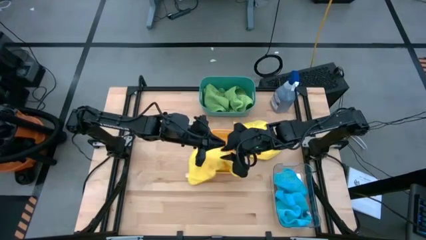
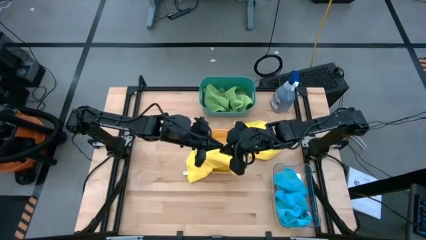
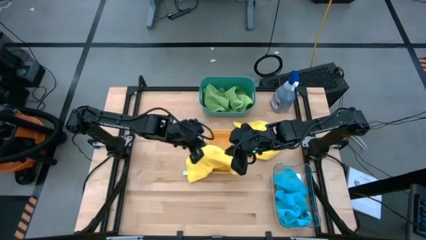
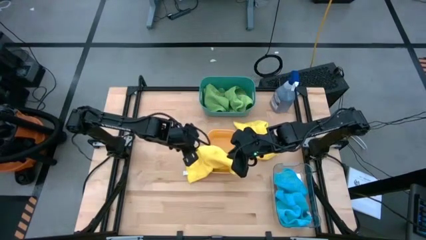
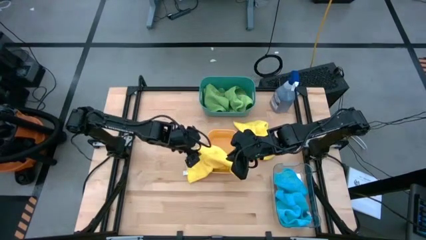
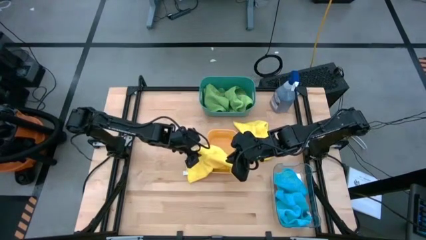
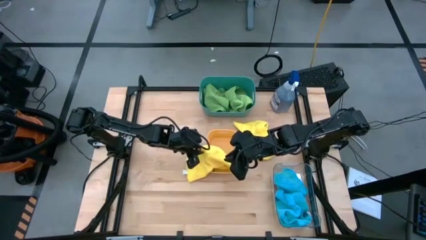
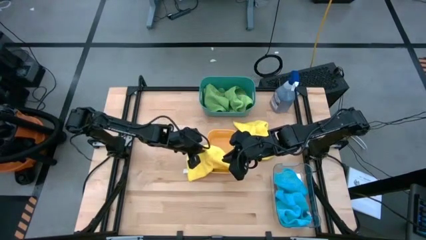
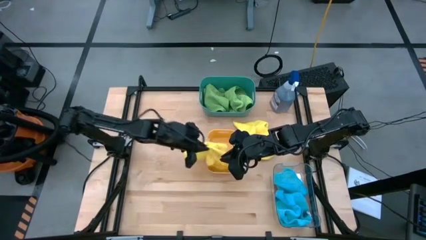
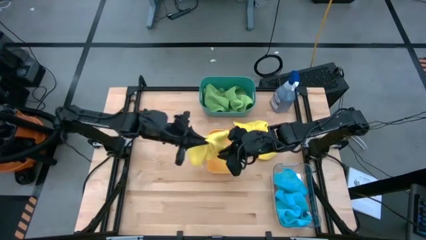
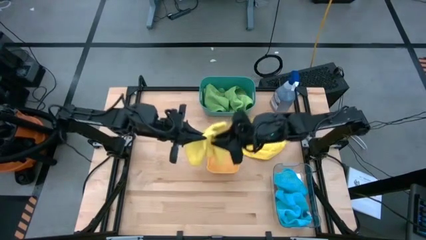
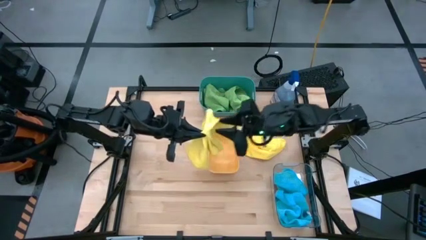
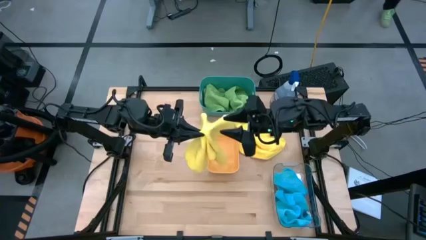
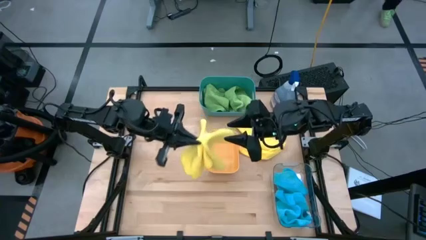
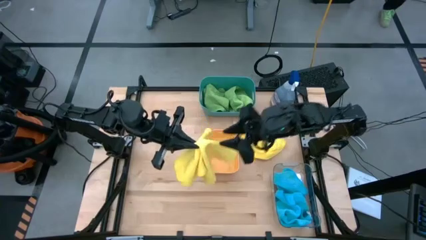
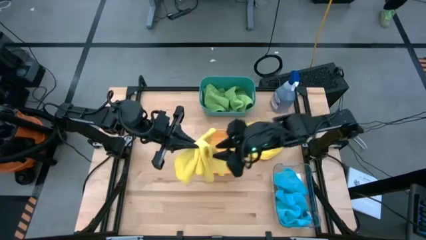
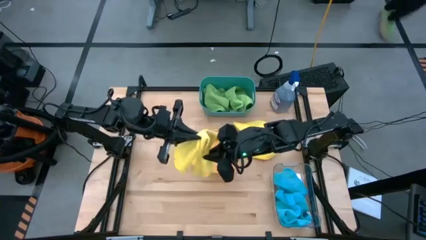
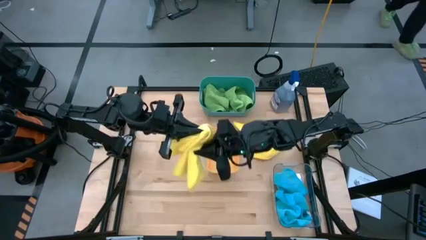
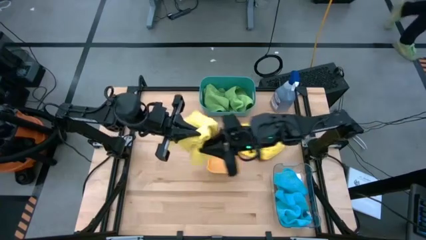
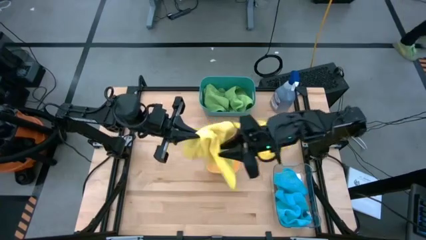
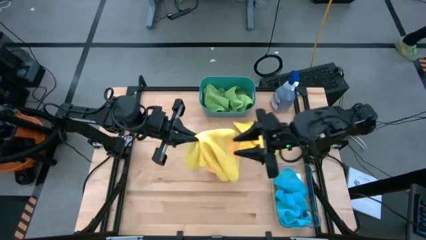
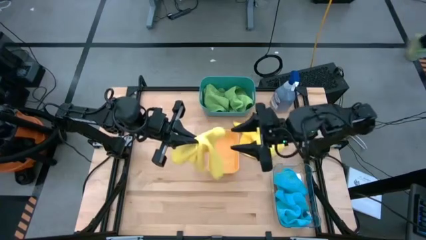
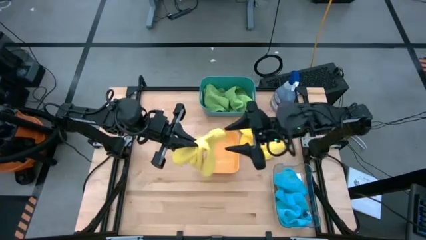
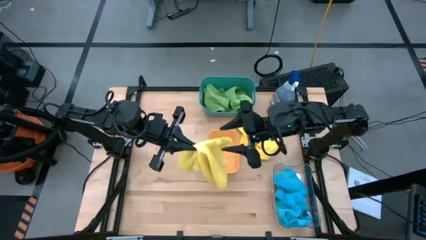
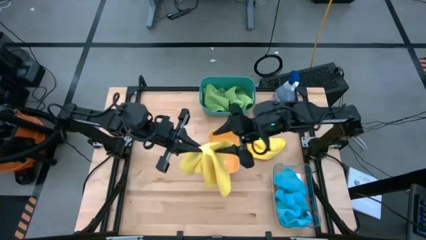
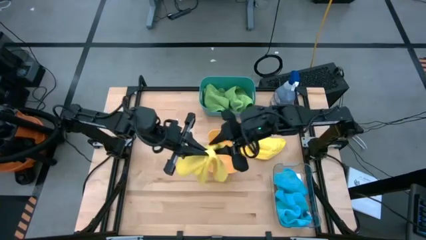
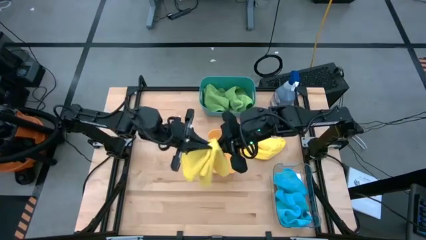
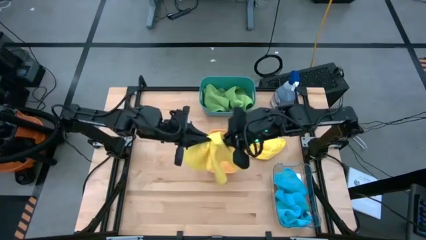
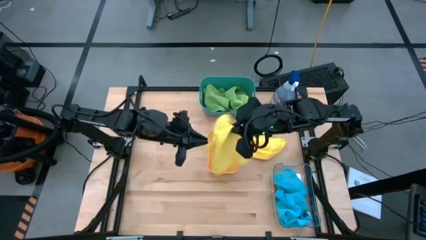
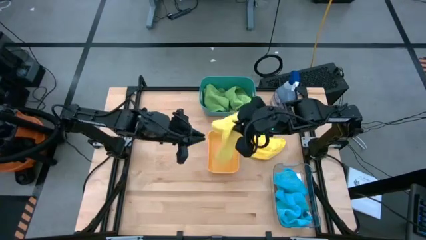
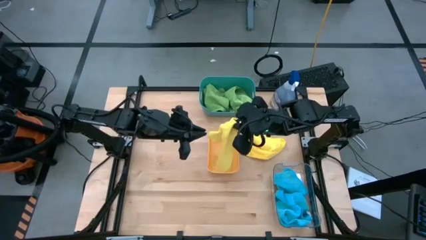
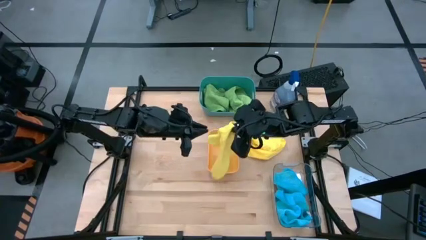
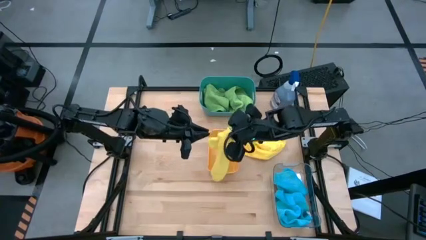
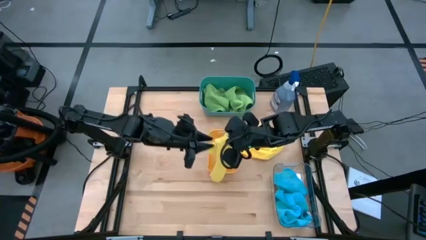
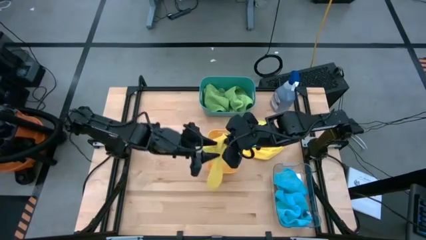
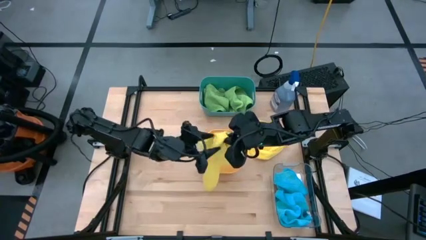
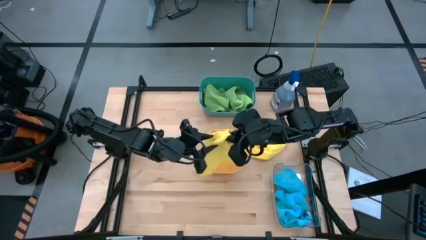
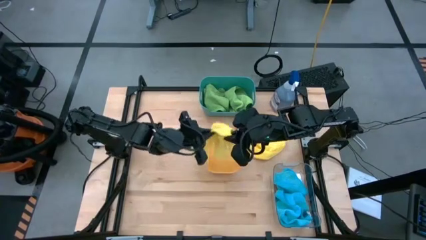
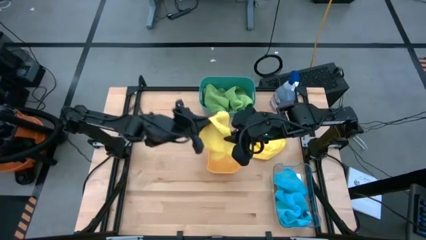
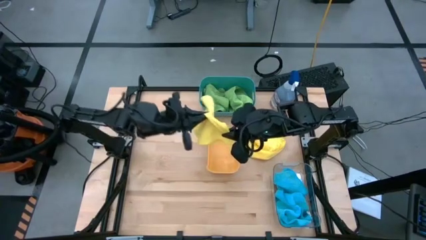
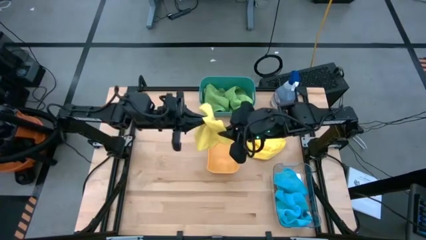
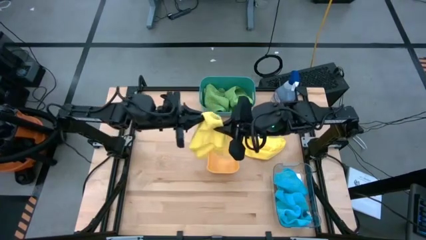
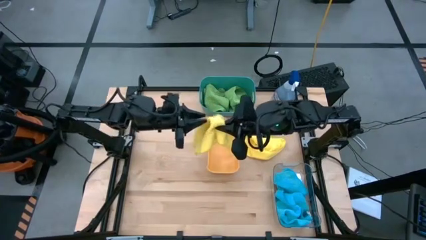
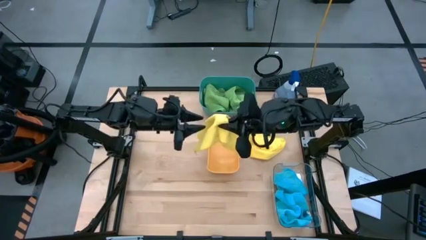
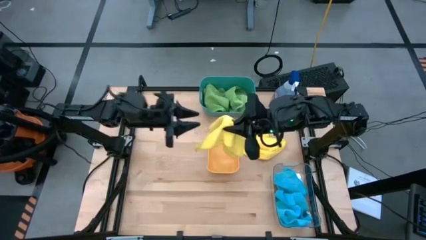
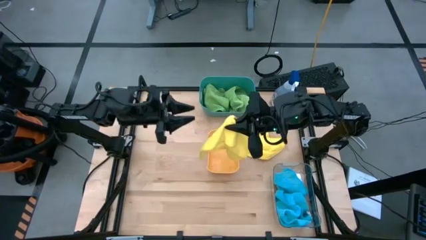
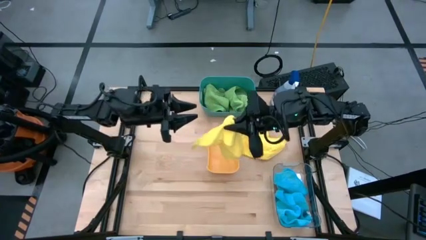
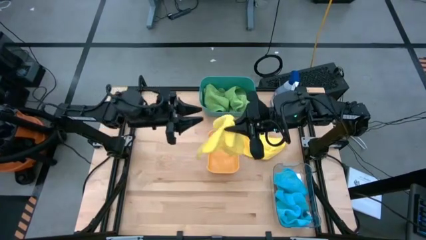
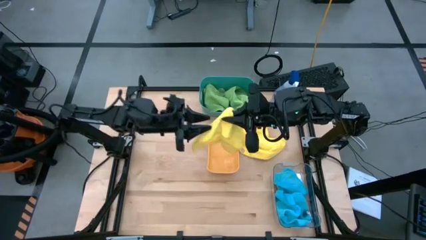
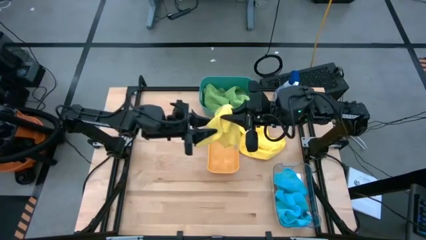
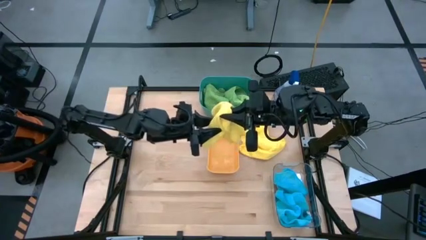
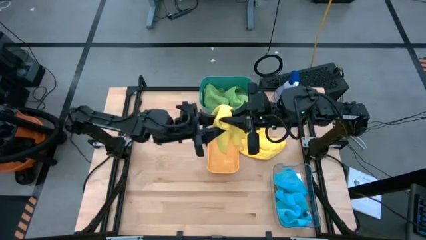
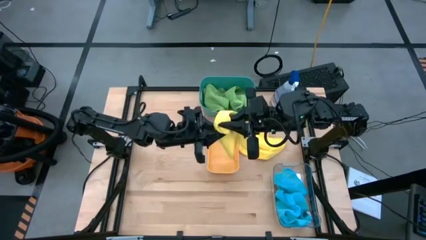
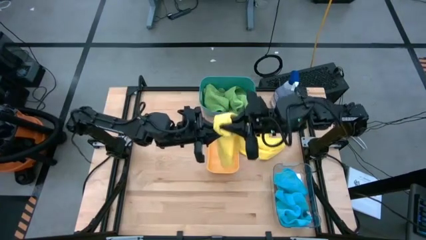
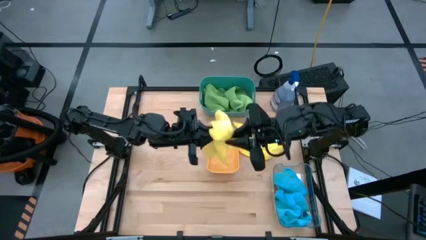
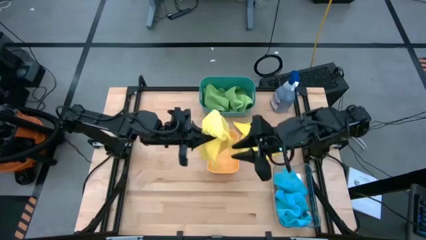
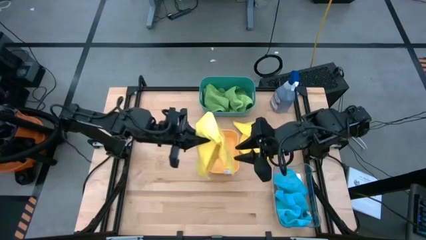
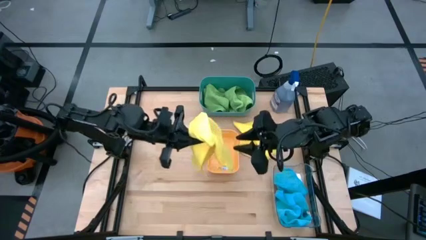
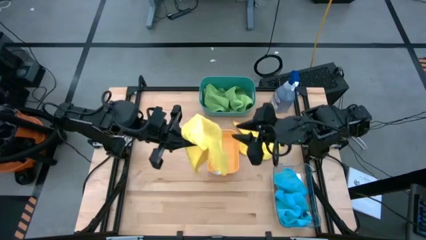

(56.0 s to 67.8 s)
Task: Sort microfiber towel by color & place in baskets
Put the left yellow microfiber towel into the yellow bin

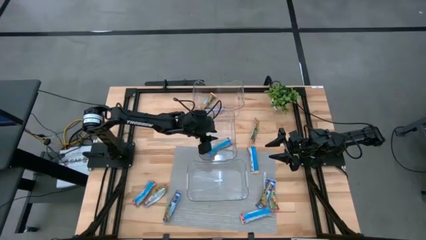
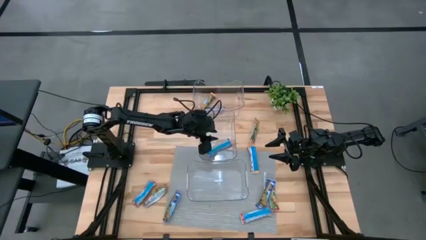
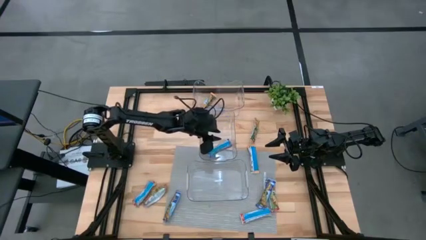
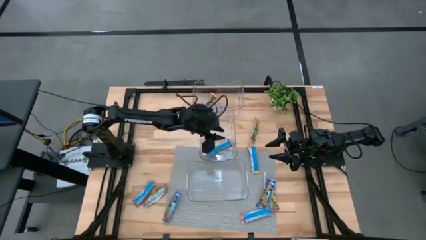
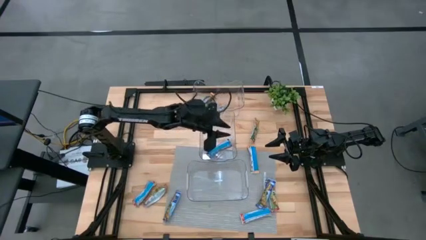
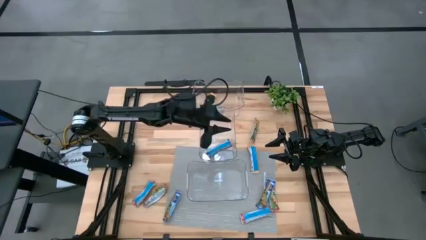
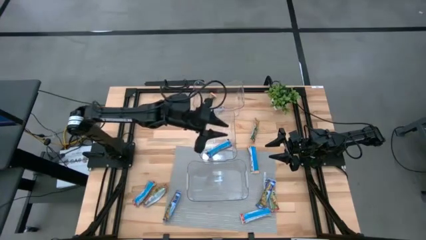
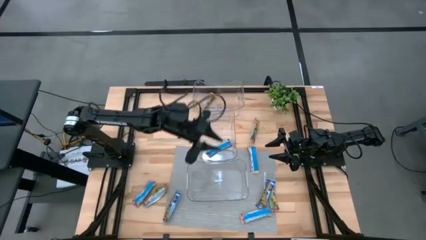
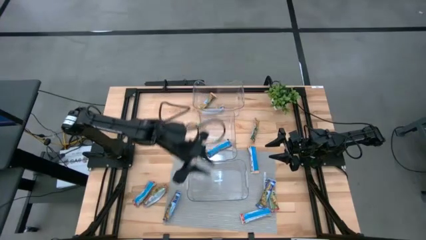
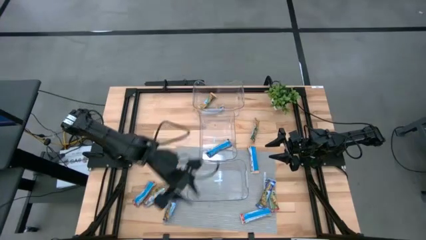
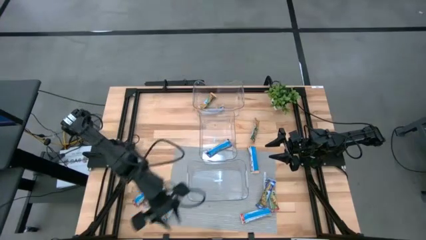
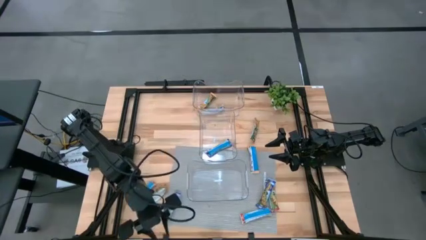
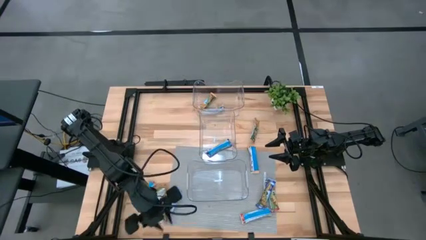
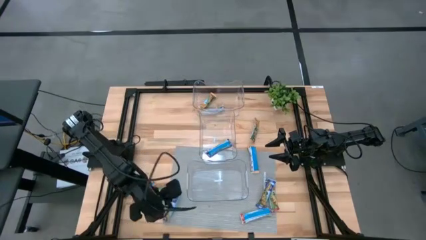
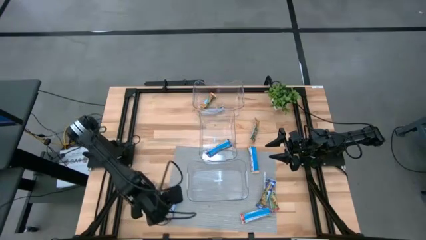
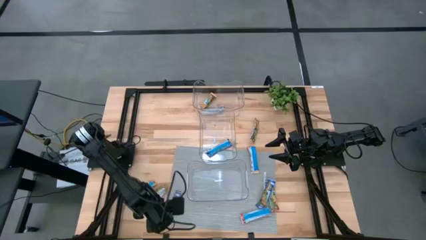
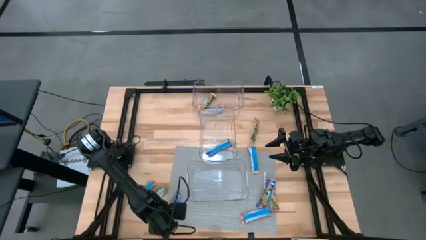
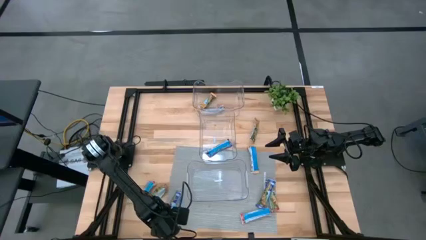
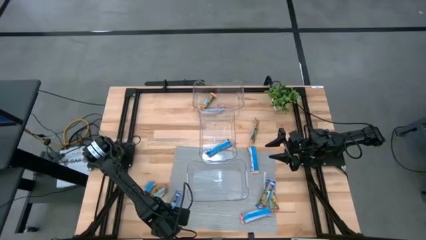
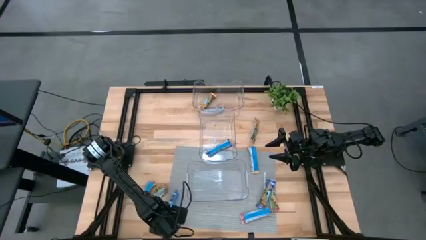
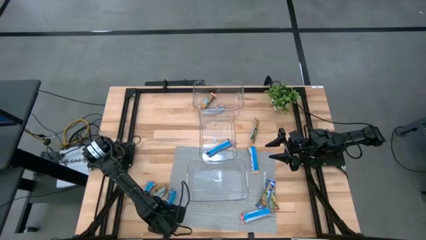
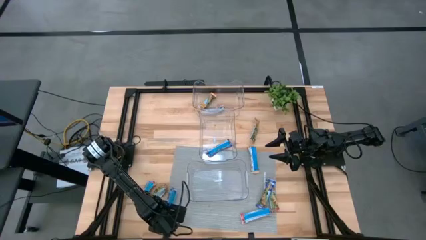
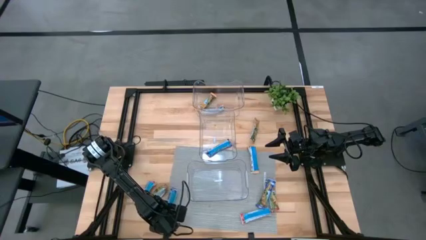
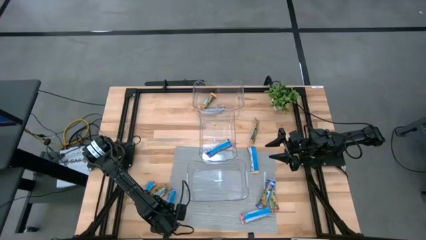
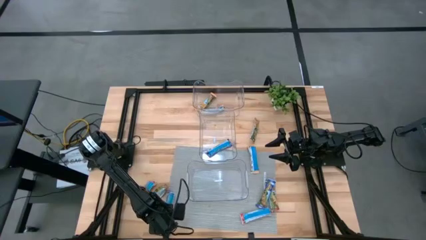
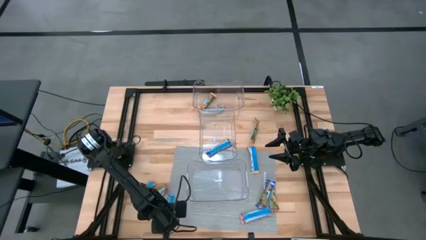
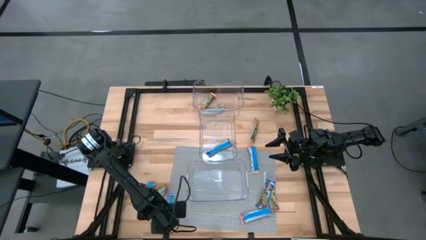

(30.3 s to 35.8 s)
Task: Pick and place Granola Bars by type
Put the blue granola bar into the middle transparent bin
